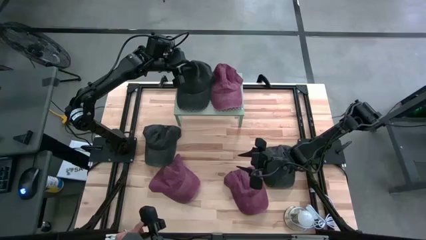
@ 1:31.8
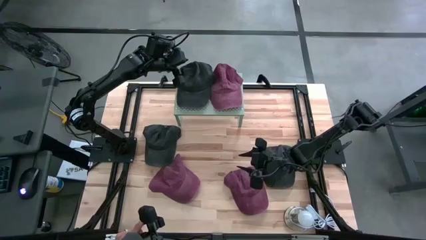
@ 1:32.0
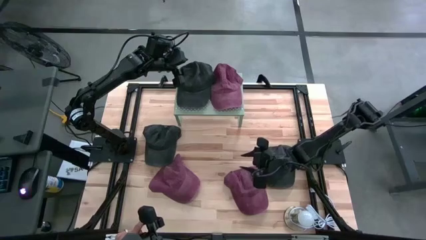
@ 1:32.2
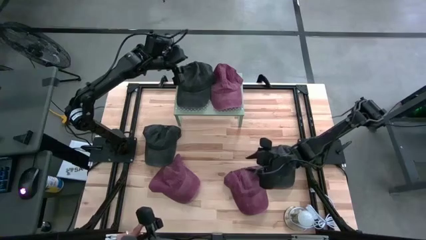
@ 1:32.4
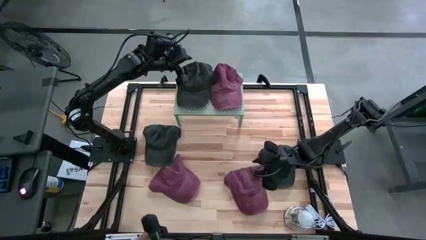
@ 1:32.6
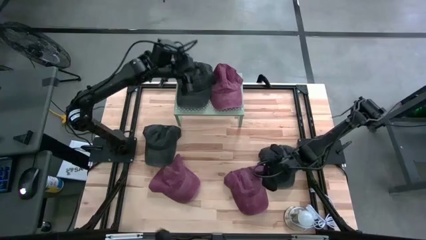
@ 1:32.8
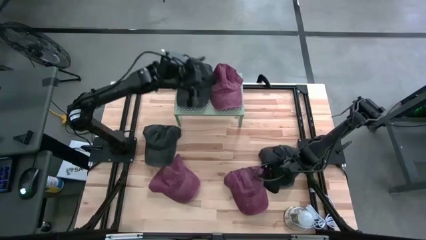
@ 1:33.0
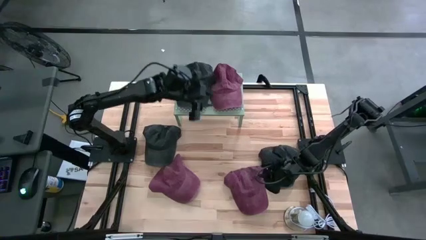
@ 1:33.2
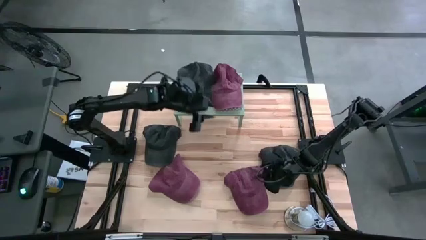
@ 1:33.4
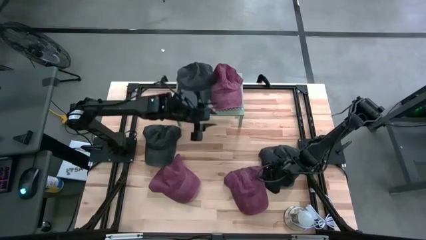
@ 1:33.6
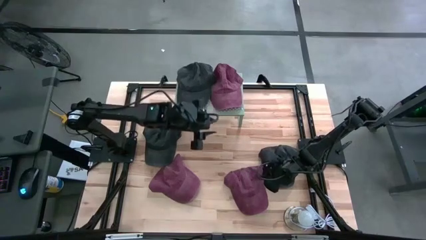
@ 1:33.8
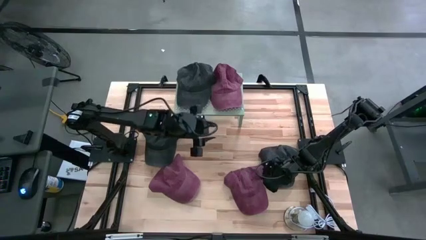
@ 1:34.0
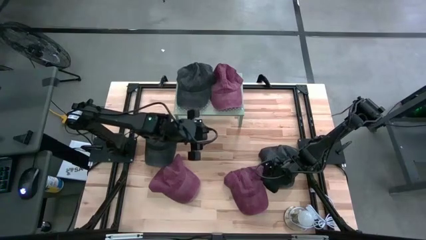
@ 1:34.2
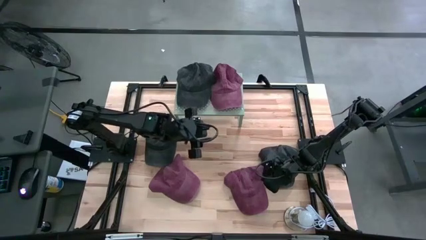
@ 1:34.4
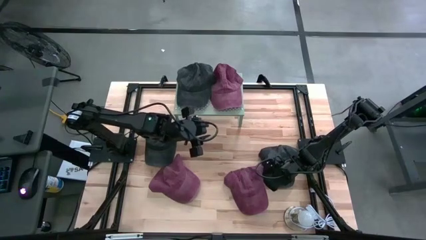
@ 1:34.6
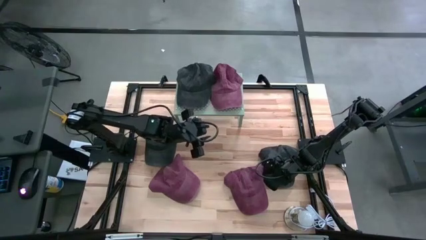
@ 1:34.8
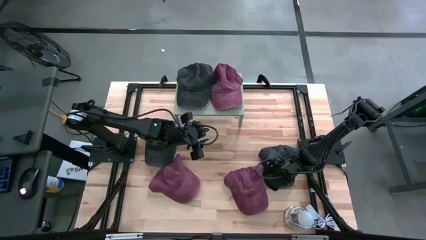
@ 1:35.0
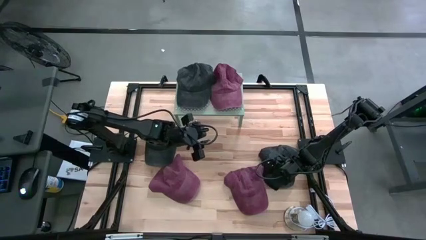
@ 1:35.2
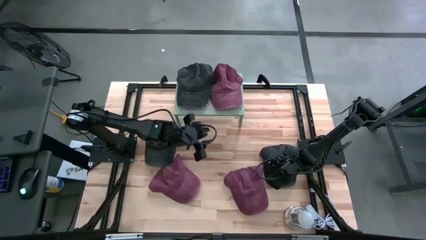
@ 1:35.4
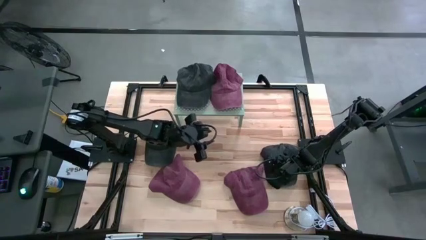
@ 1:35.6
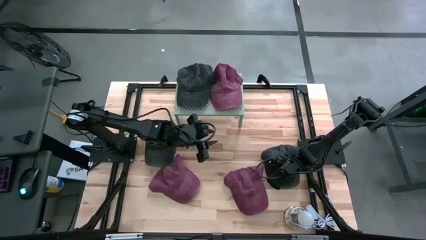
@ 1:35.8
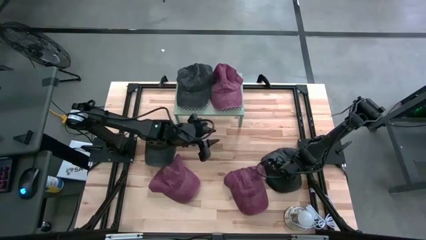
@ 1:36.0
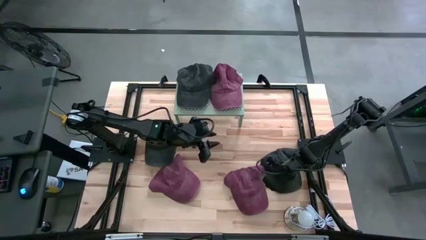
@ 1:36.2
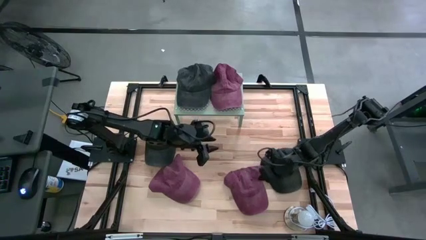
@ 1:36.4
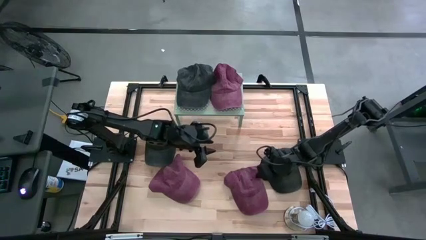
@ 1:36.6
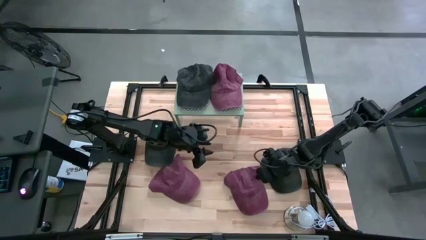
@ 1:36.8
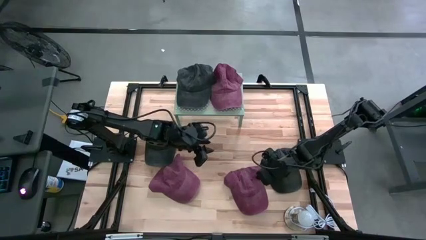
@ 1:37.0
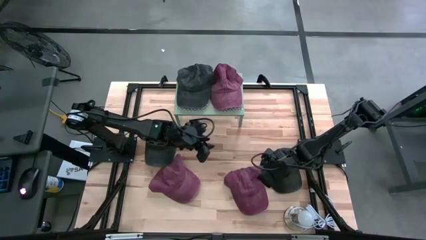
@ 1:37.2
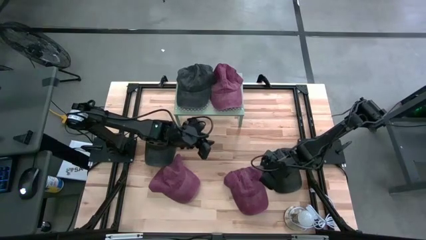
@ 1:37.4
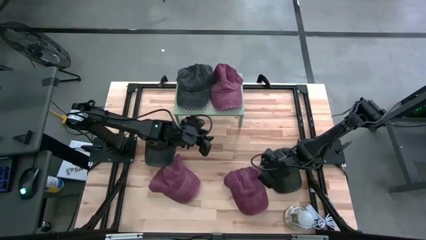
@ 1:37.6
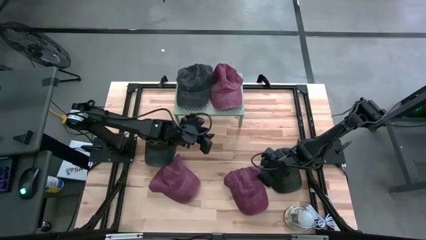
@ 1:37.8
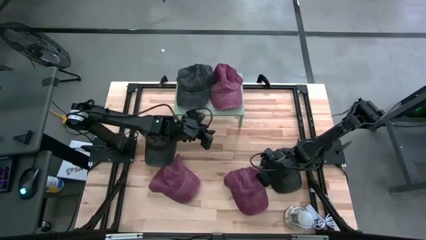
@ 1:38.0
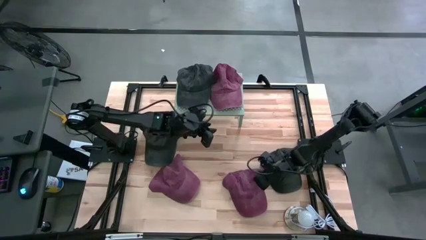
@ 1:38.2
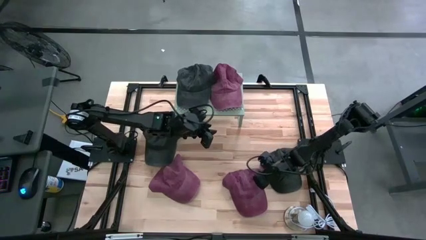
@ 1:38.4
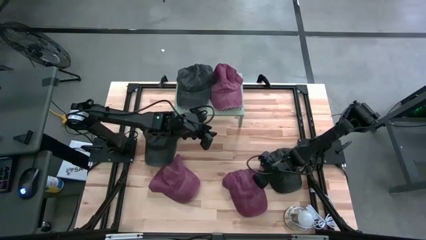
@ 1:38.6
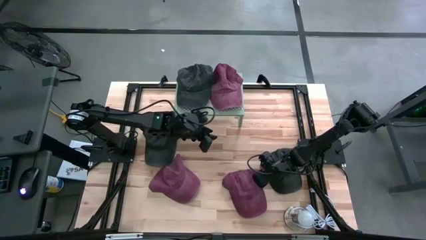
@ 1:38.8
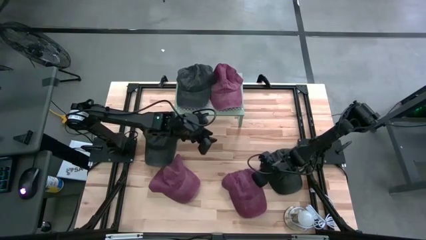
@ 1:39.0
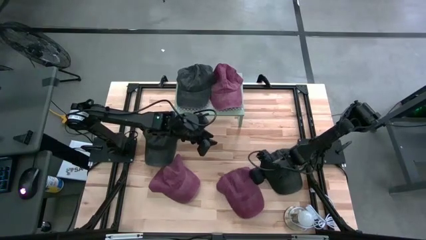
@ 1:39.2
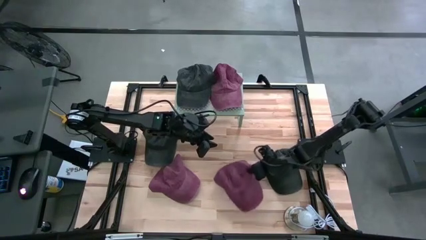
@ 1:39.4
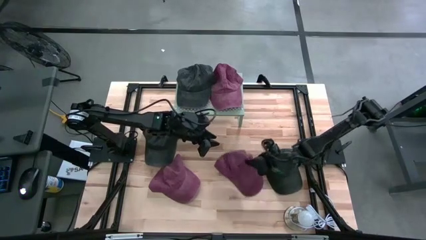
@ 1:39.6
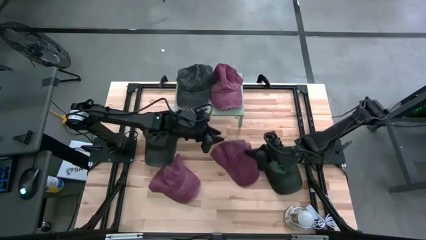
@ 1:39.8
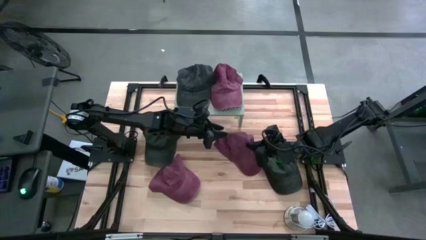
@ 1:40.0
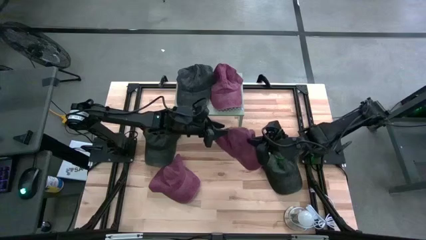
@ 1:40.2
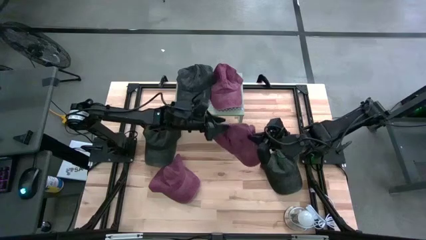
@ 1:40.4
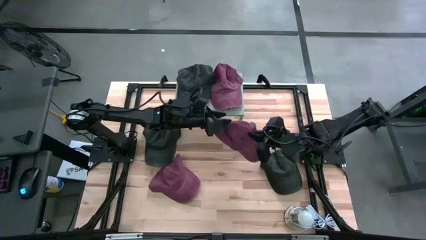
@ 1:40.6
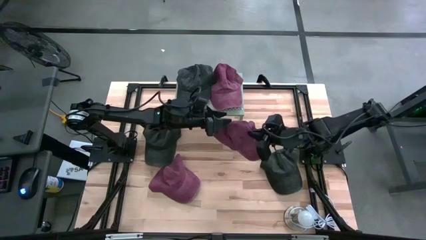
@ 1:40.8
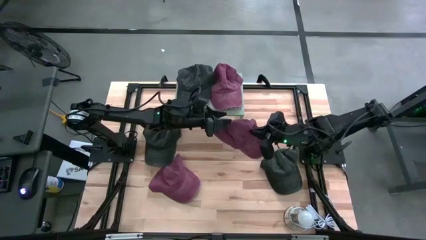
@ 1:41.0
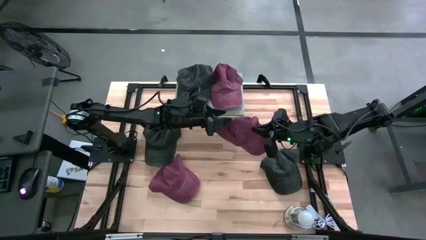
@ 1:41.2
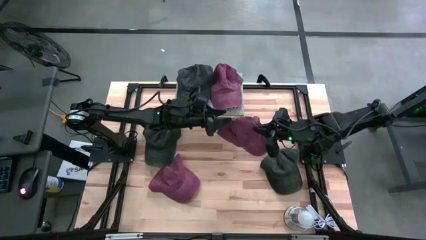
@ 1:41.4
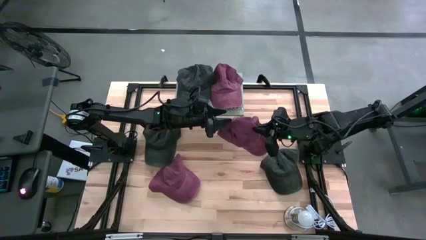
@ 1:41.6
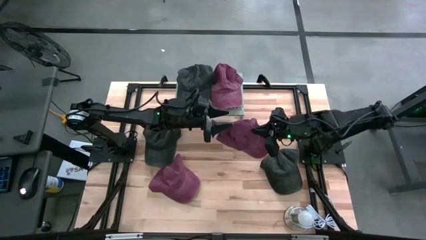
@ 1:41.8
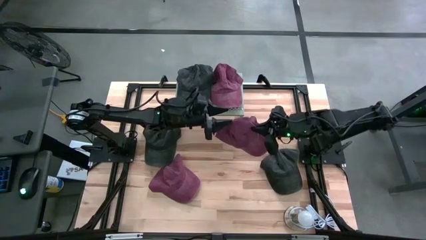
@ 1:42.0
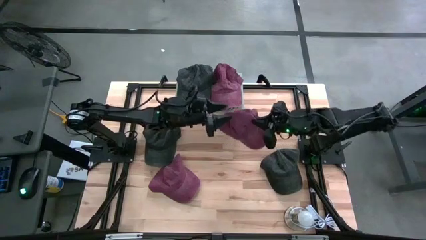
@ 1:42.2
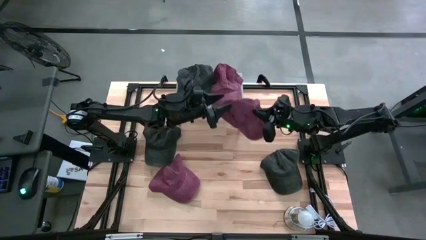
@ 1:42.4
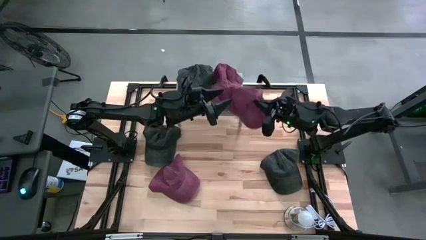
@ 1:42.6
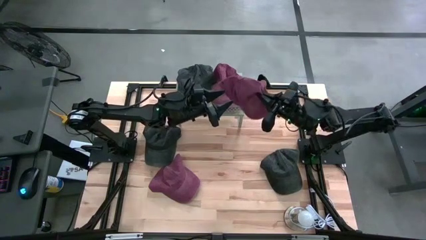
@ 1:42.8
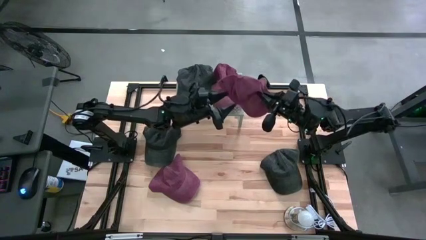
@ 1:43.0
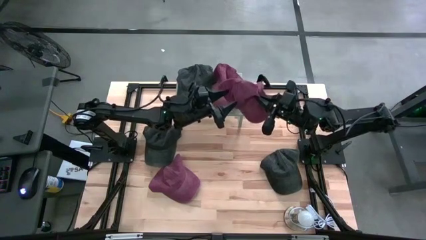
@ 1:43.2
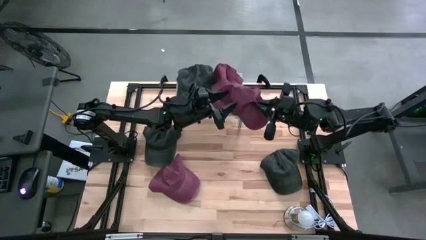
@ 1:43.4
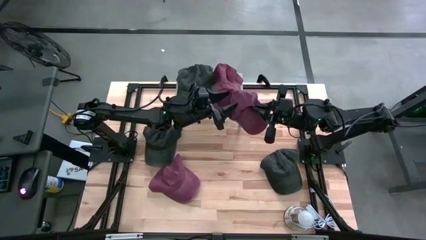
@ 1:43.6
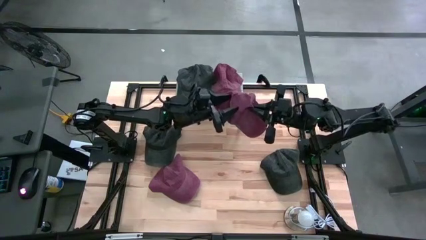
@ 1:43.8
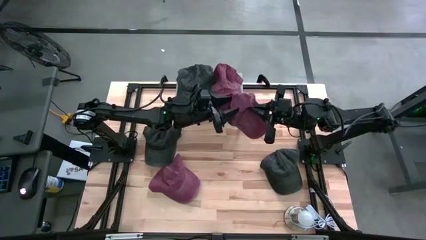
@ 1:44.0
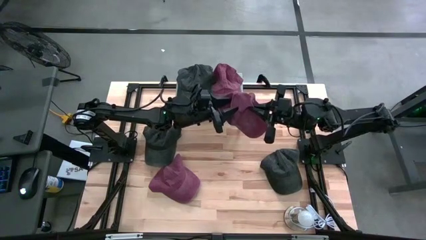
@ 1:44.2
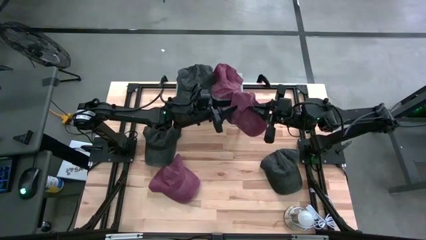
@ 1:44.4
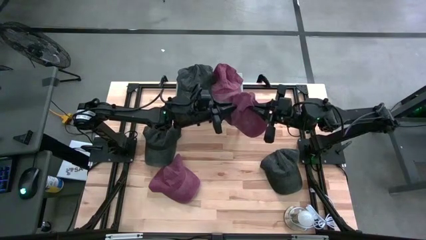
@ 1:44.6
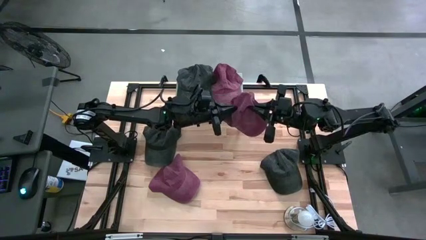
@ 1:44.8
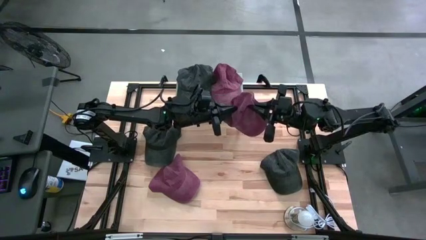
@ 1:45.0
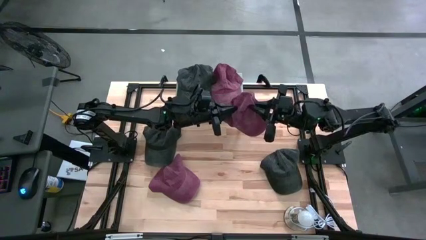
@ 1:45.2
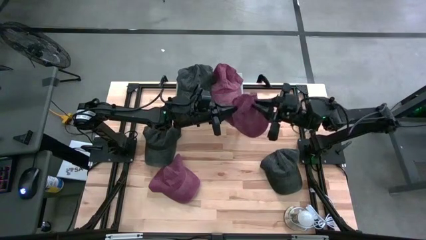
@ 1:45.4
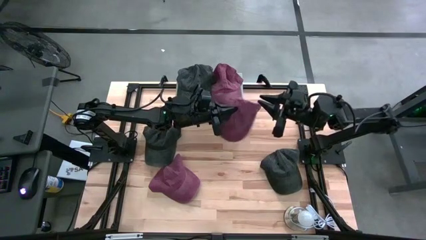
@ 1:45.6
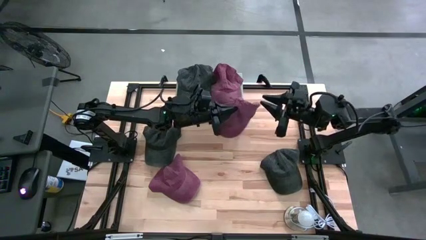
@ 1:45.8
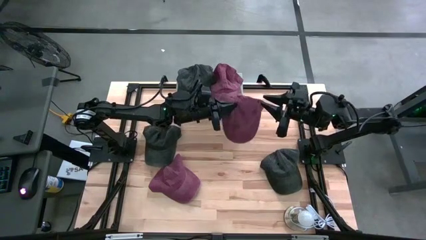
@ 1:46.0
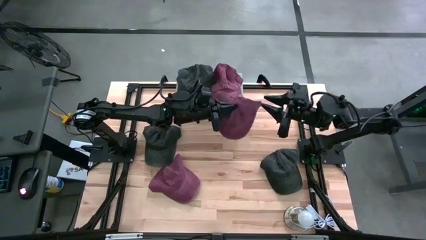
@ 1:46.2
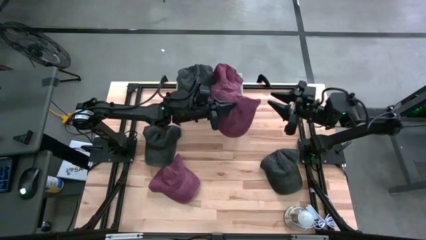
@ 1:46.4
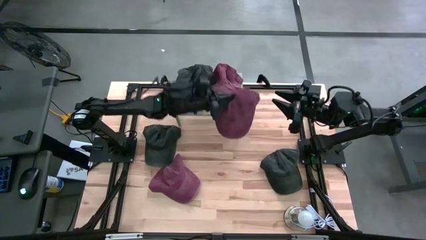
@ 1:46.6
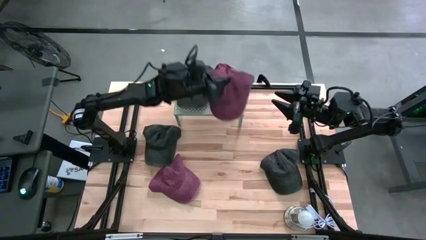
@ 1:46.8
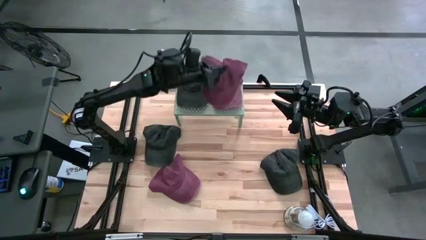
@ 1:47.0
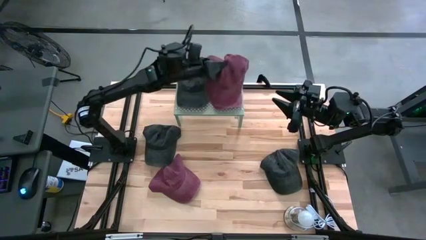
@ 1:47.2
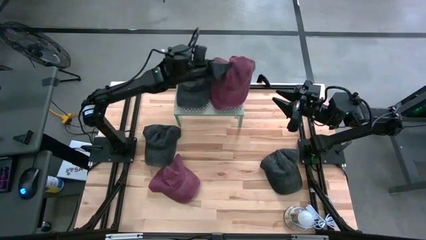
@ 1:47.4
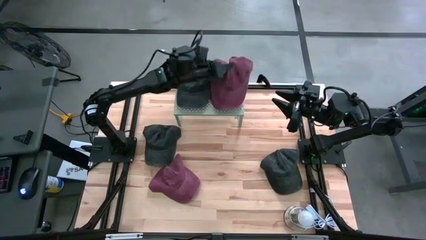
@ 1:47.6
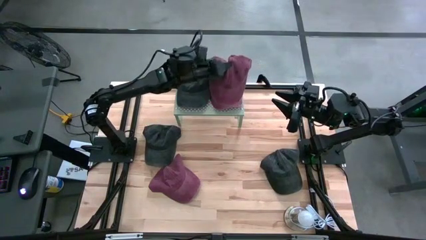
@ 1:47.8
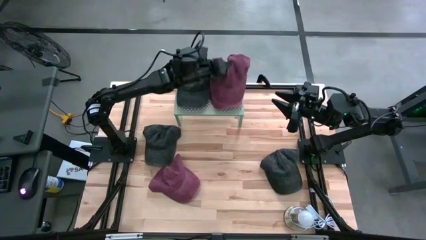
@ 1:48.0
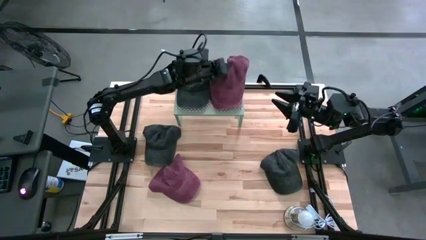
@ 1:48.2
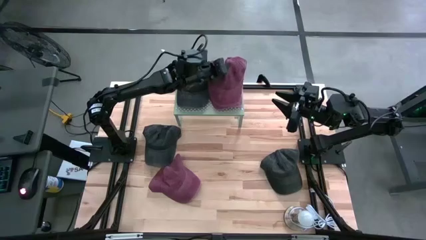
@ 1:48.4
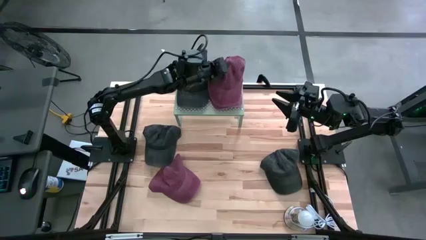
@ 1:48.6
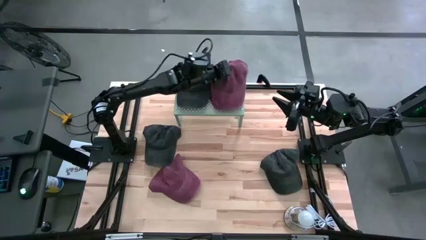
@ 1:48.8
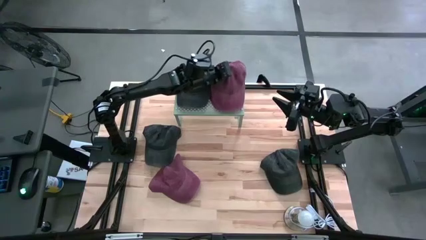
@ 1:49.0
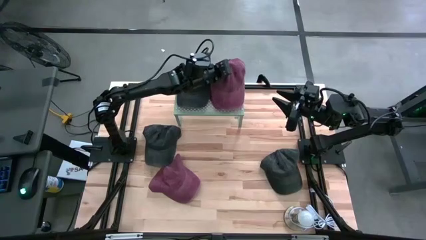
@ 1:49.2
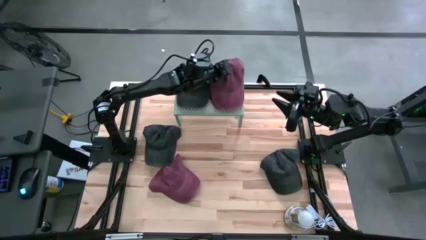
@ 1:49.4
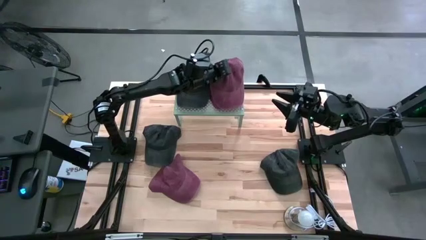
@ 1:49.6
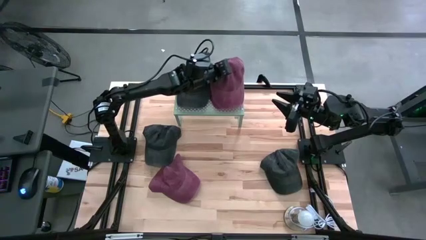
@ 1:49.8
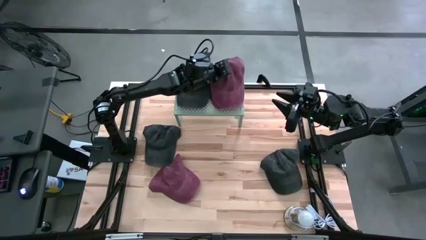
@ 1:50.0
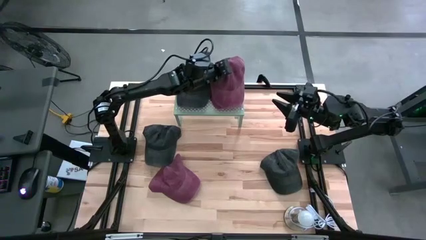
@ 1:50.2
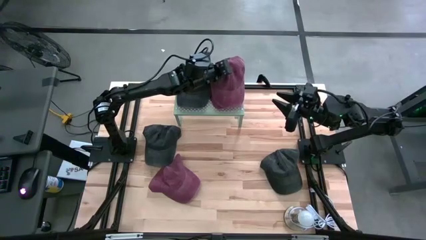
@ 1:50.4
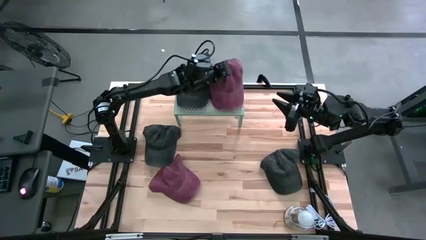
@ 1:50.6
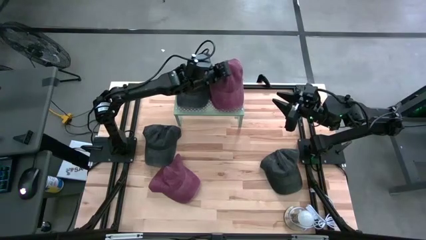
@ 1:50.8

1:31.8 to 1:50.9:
Task: Pick & Place hat
Stack the right maroon cap on top of the maroon cap on the shelf
